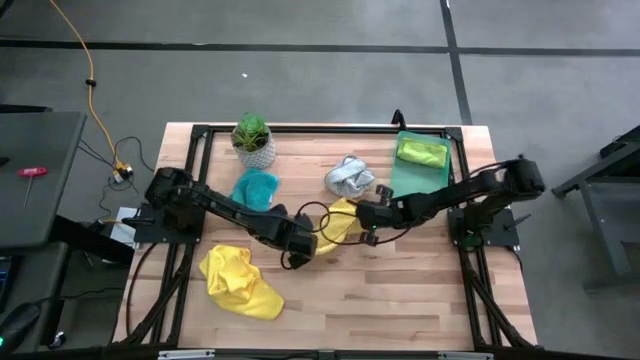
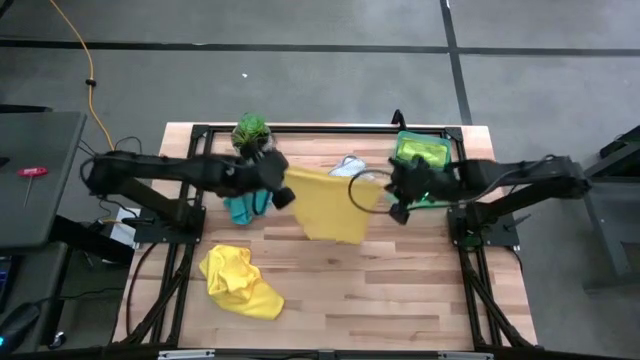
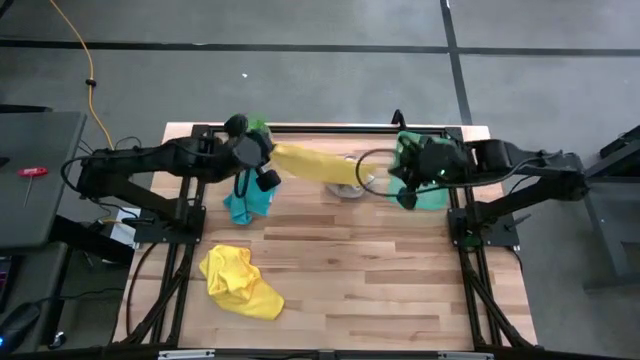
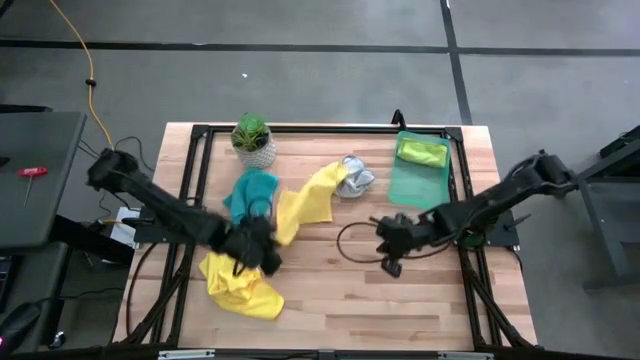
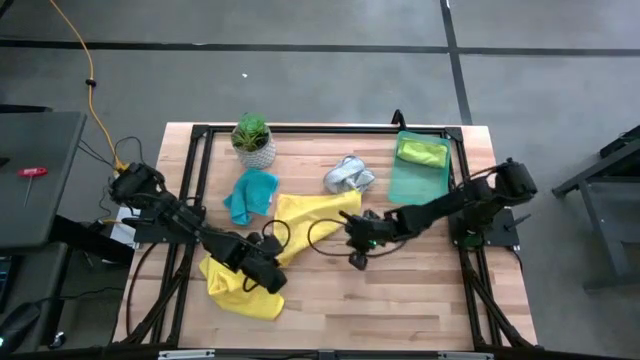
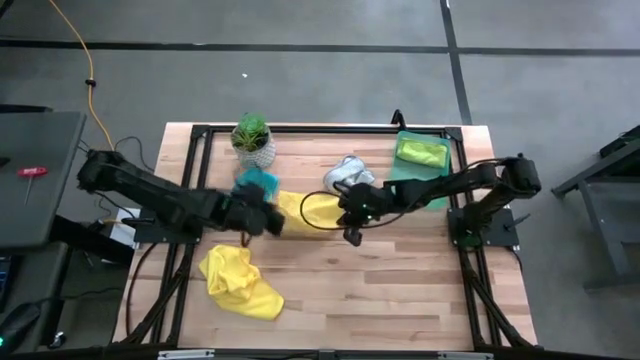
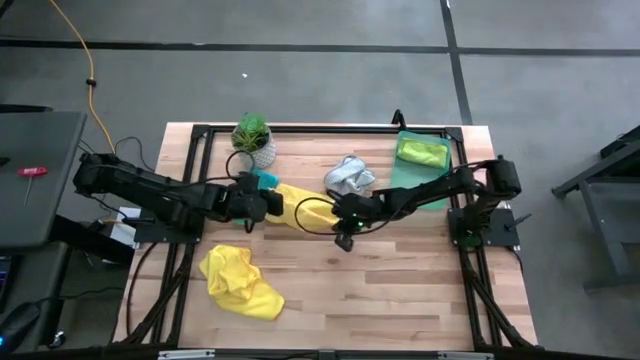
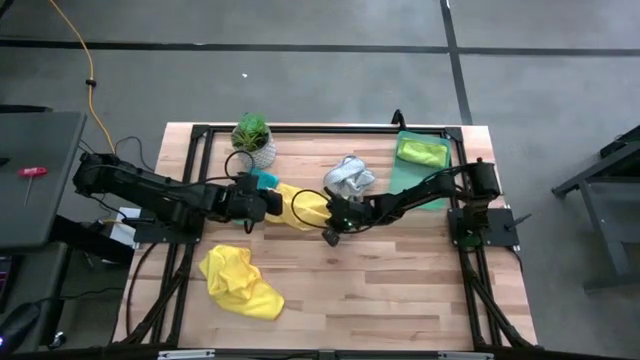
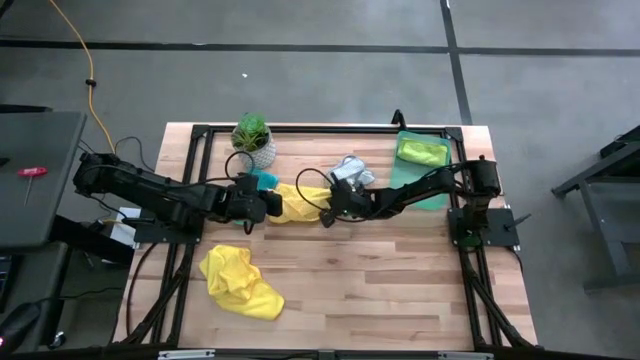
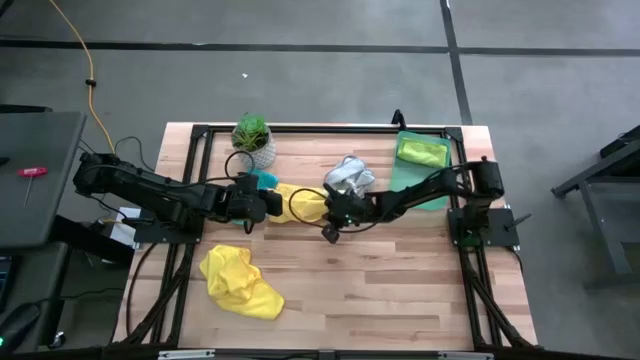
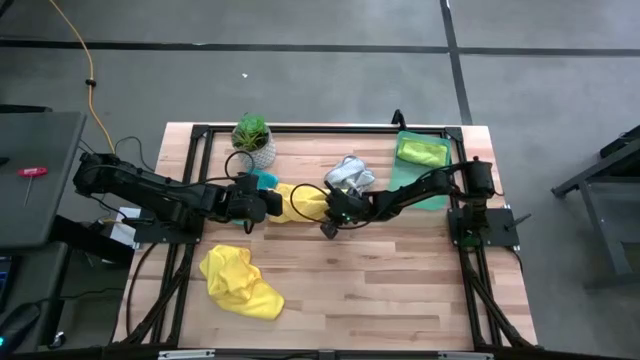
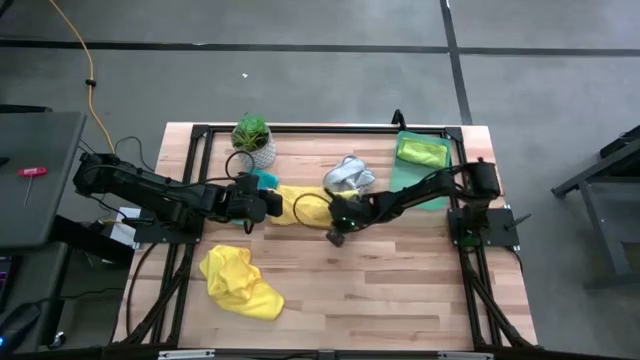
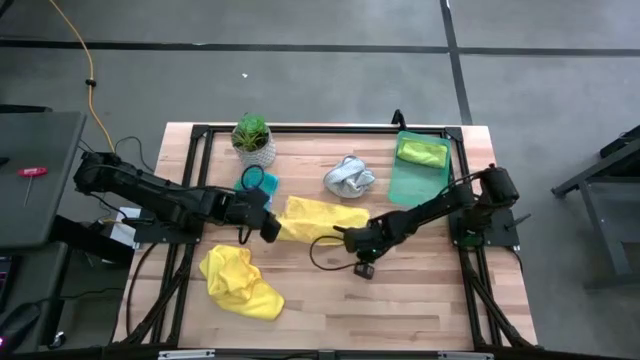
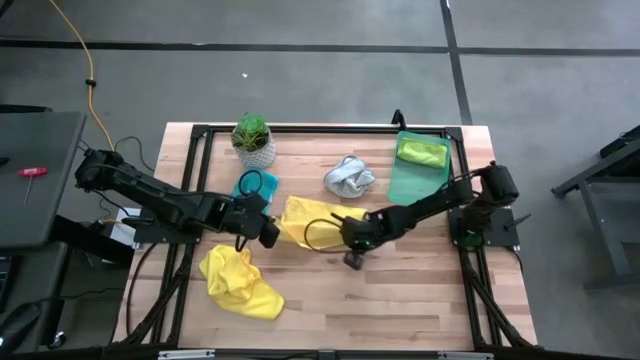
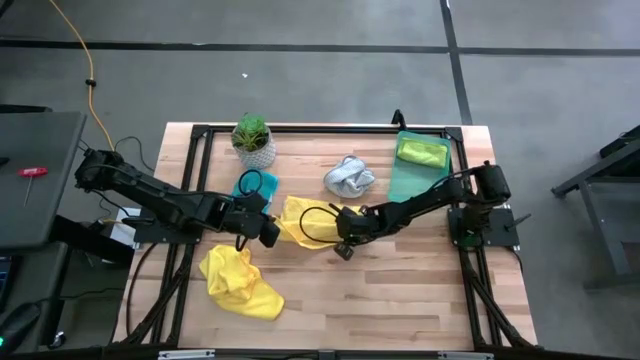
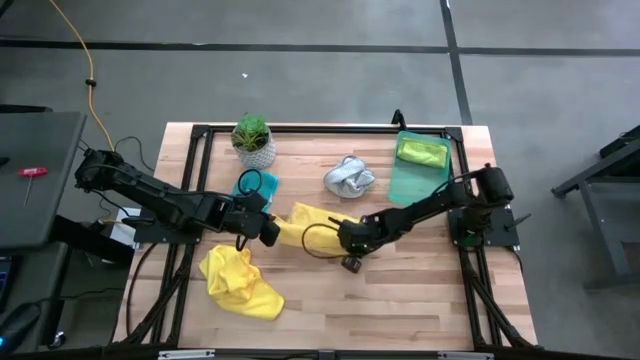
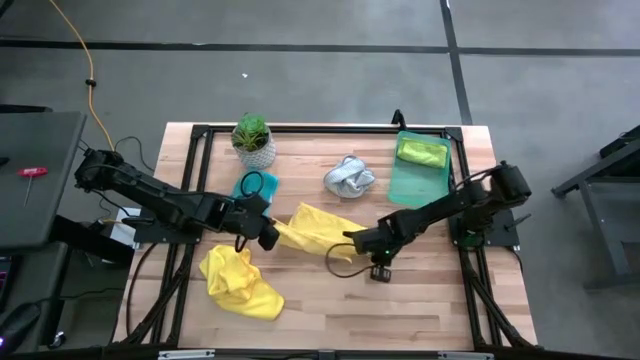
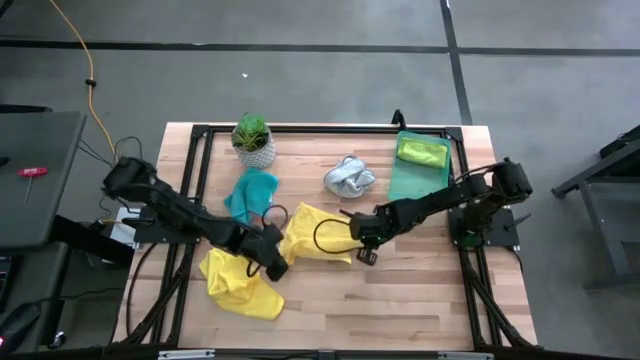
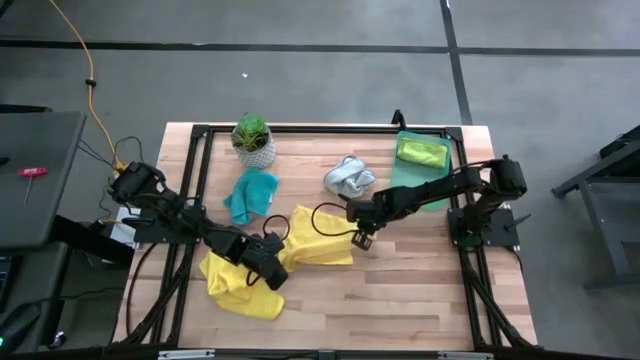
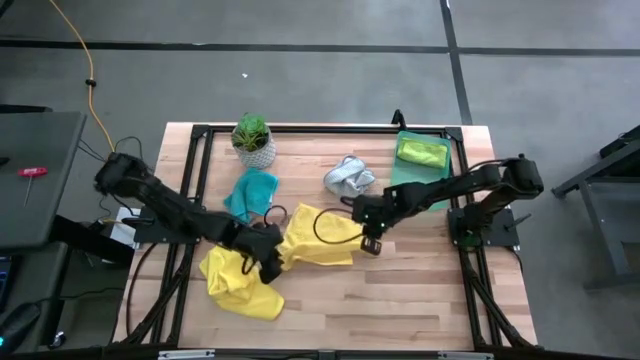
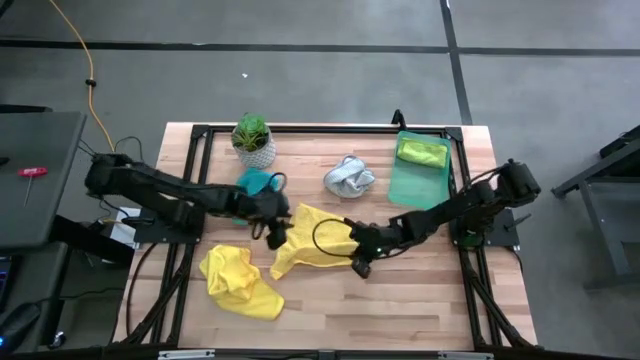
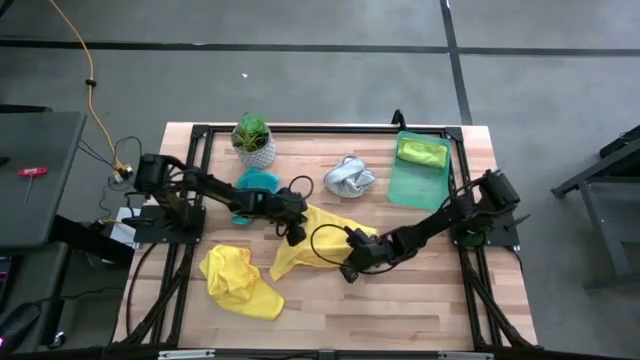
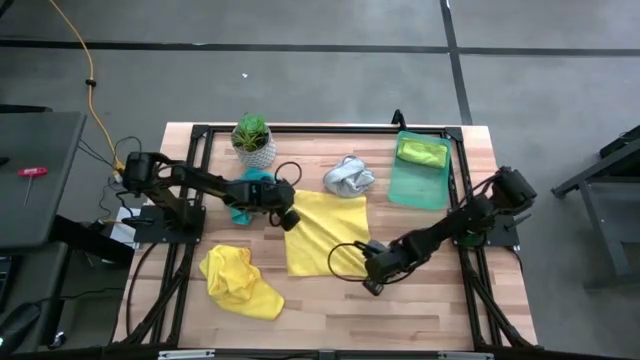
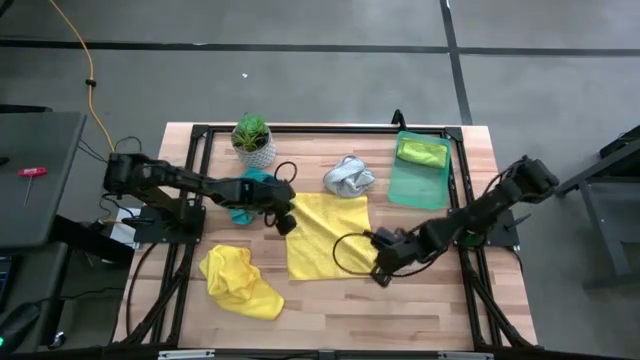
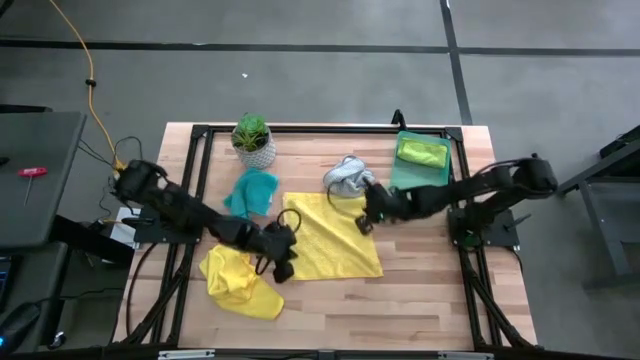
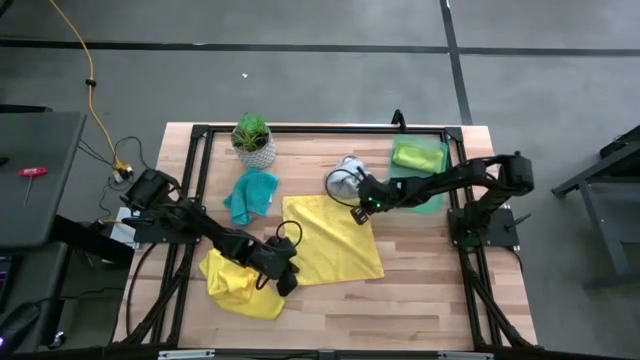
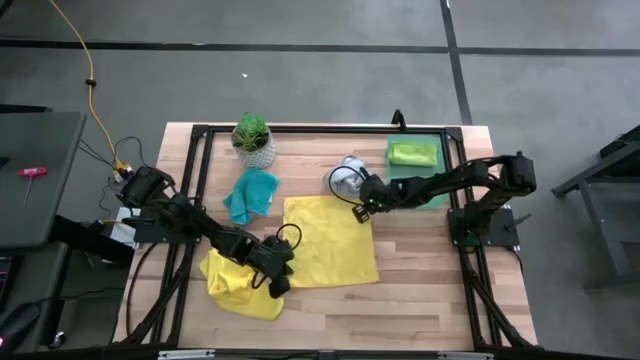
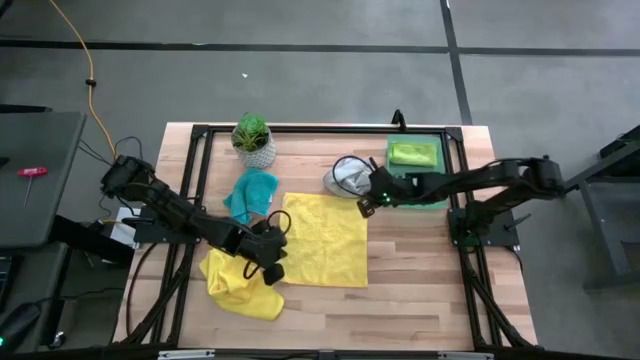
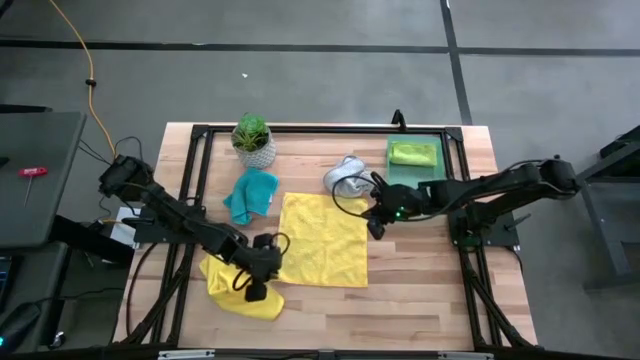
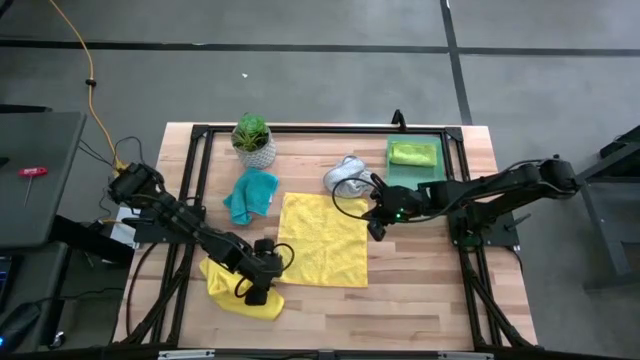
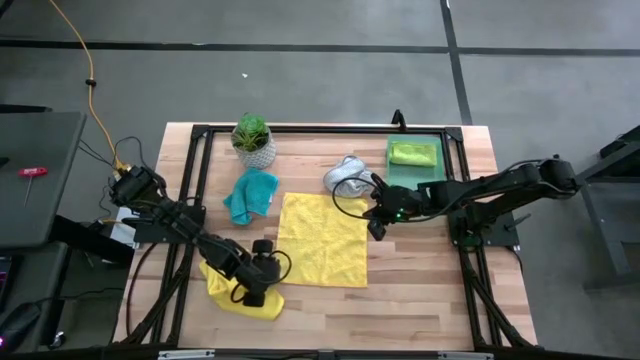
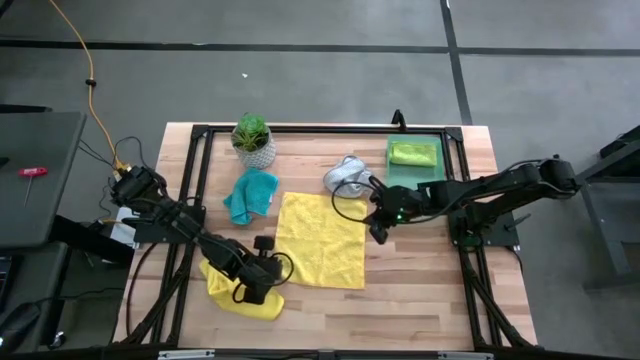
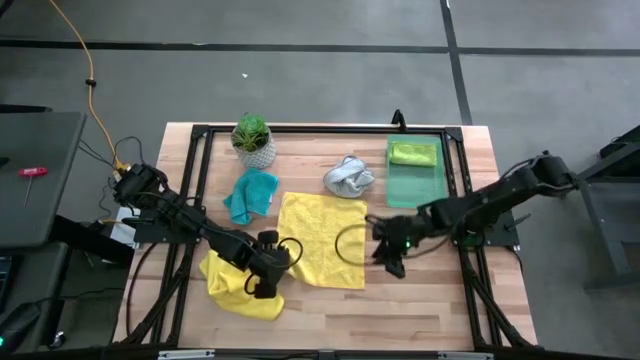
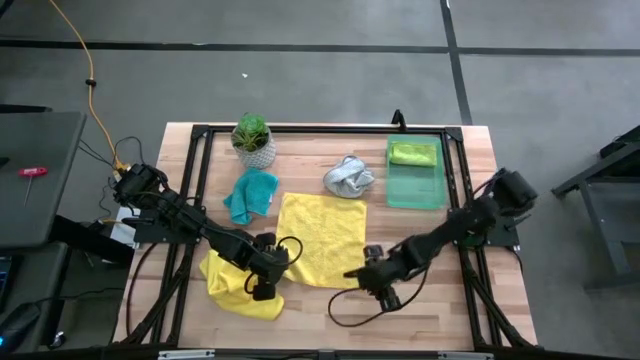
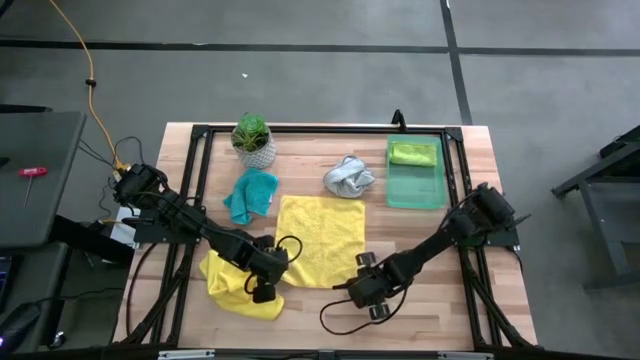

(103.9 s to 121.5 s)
Task: Fold microfiber towels
Fold the right yellow microfiber cloth

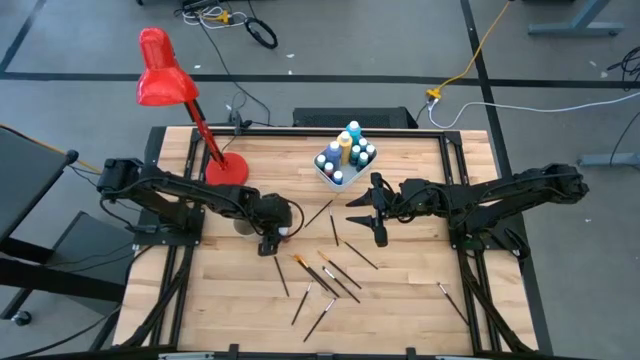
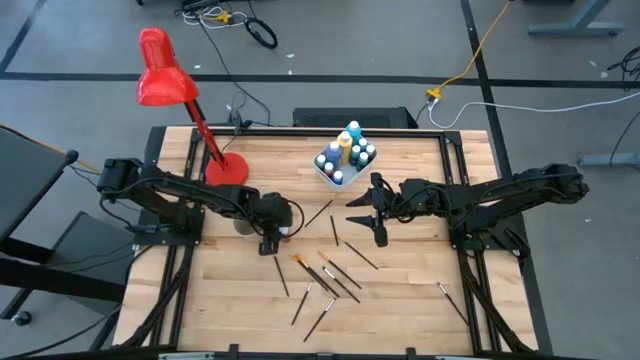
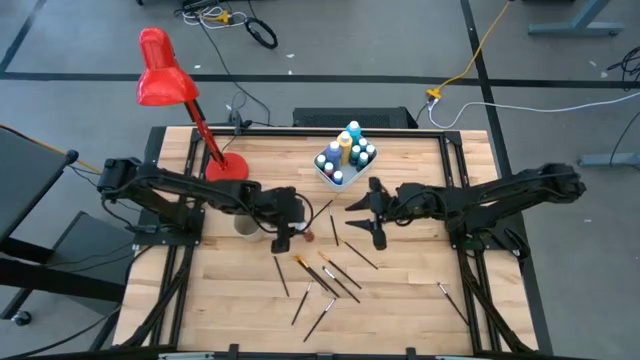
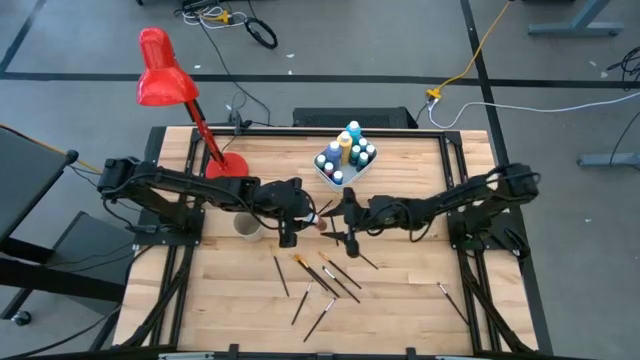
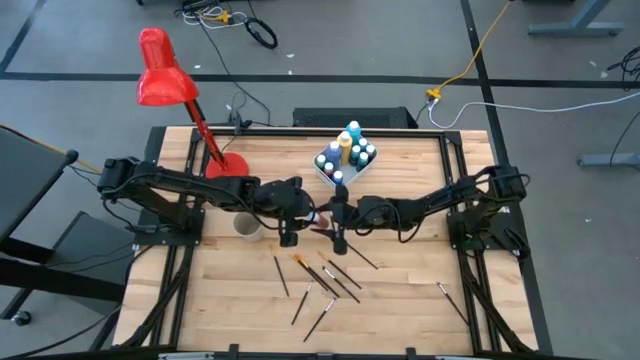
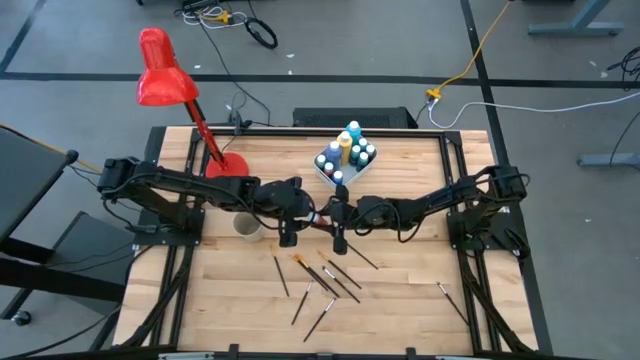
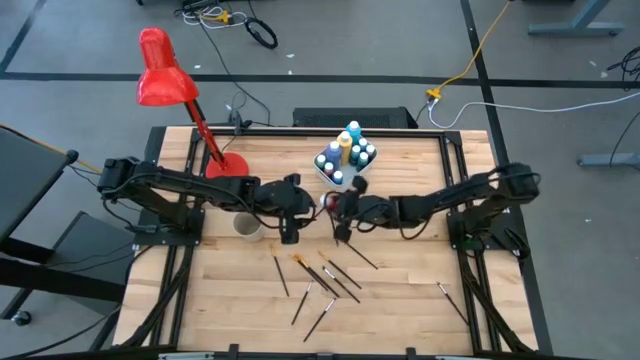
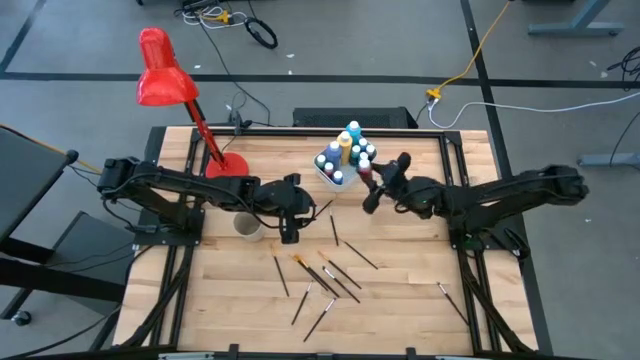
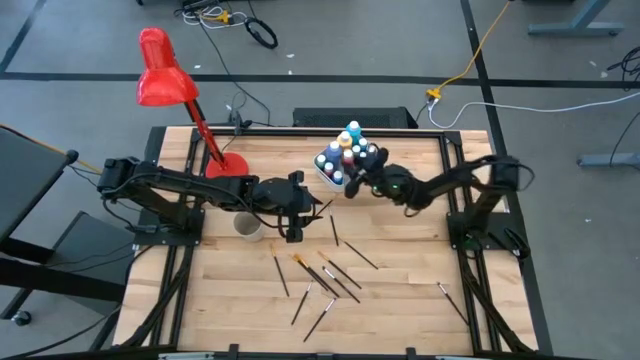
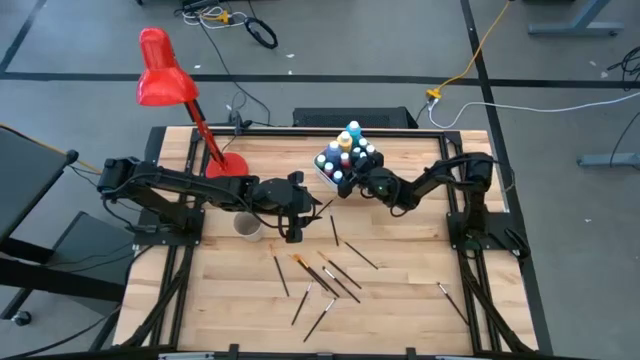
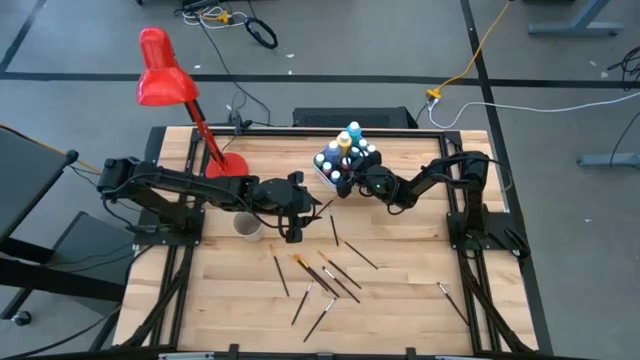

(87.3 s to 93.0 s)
Task: Pick & Place Paint Supplies
Put the small orange paint bottle into the white bin
